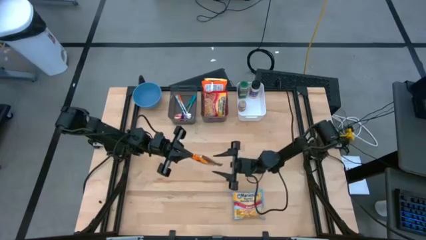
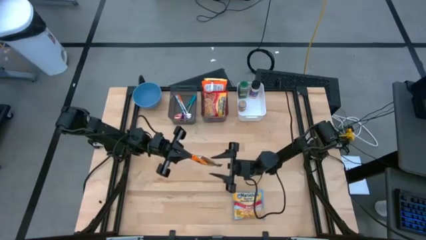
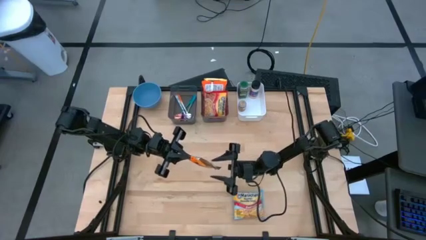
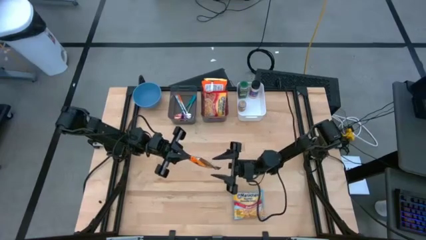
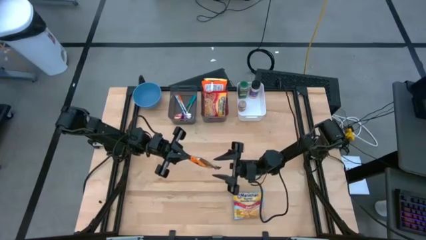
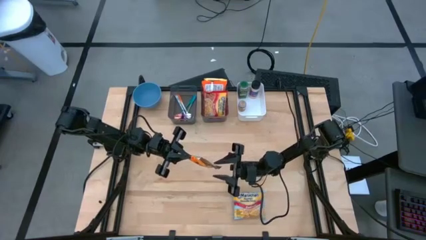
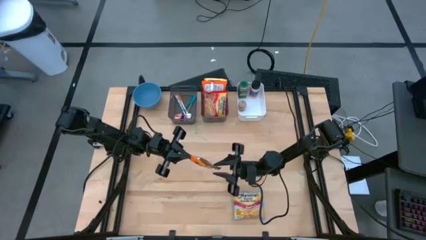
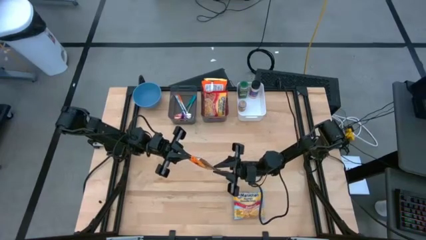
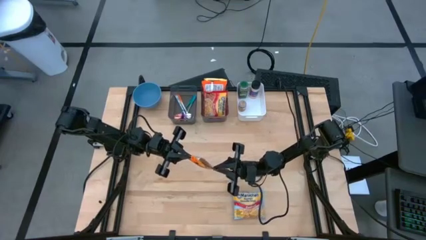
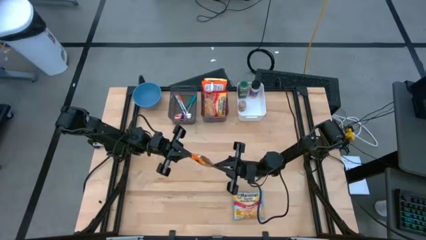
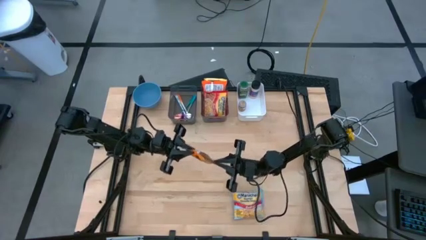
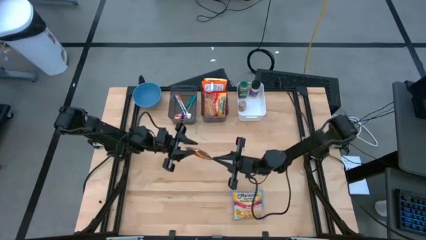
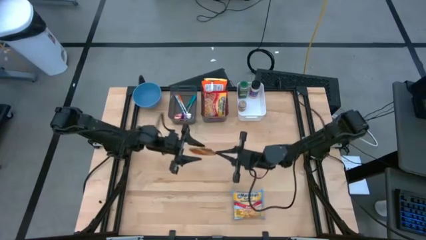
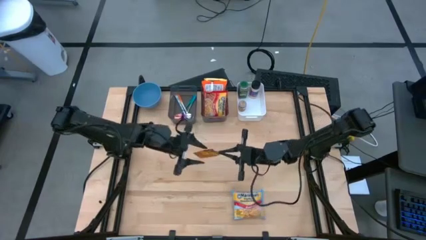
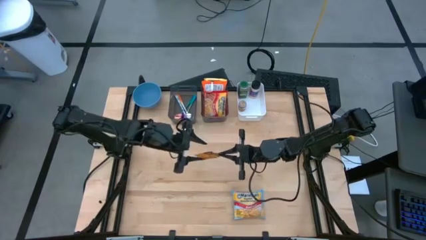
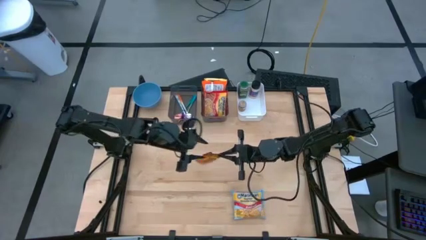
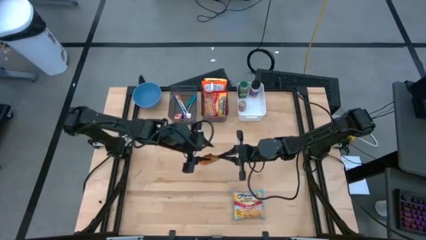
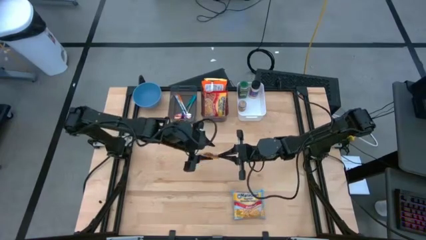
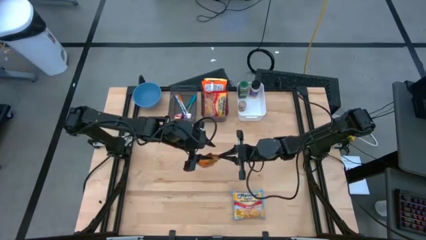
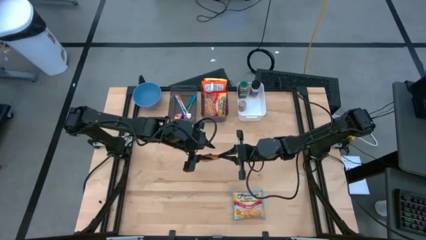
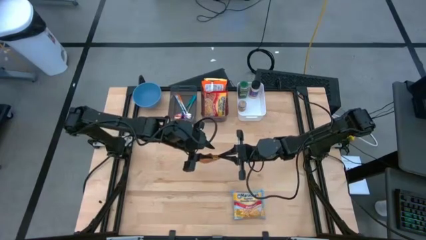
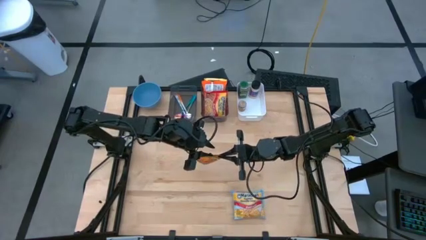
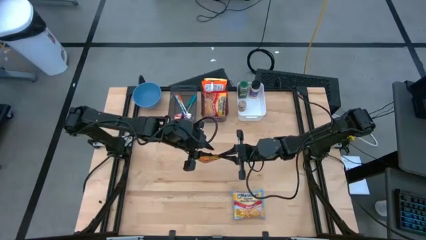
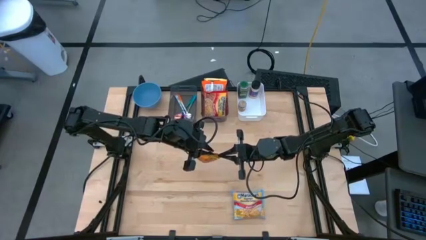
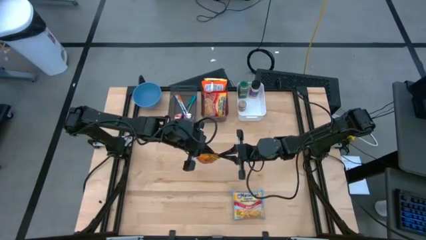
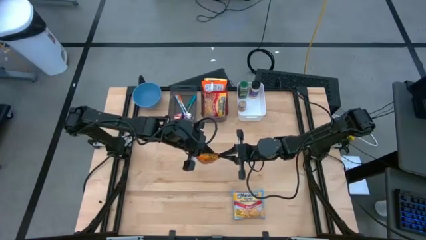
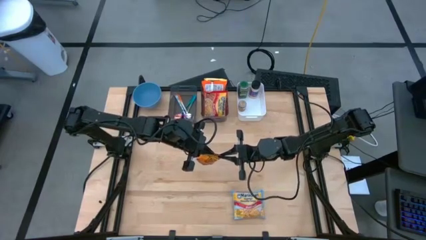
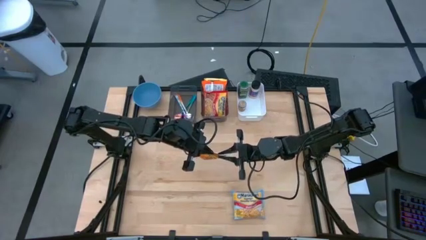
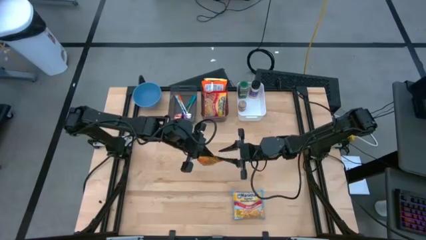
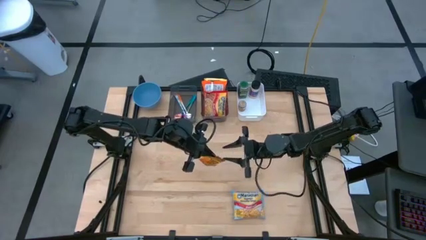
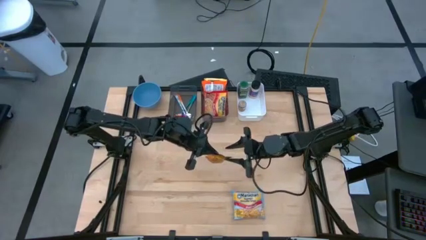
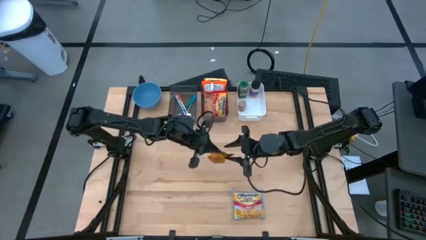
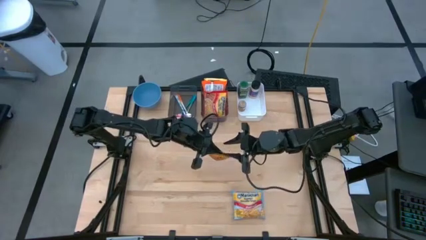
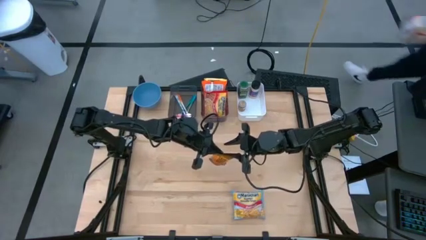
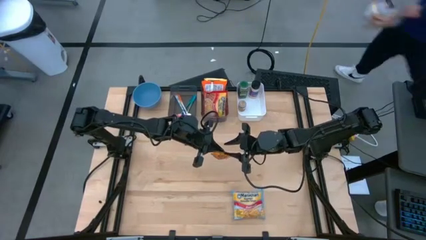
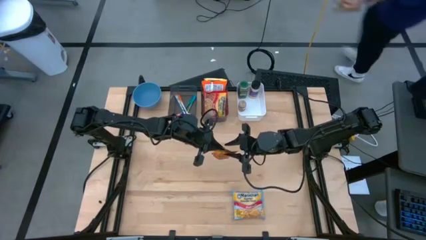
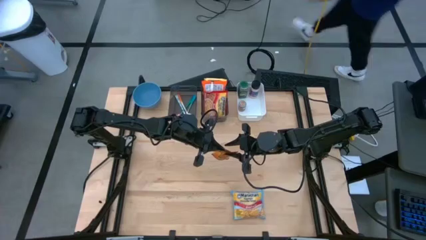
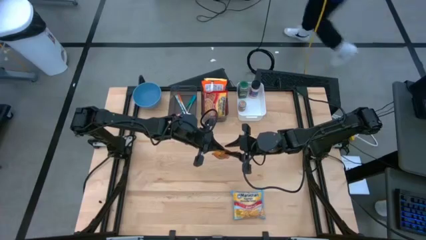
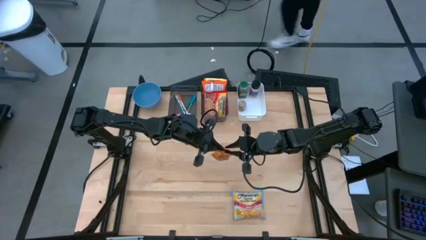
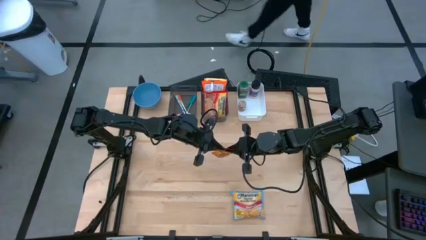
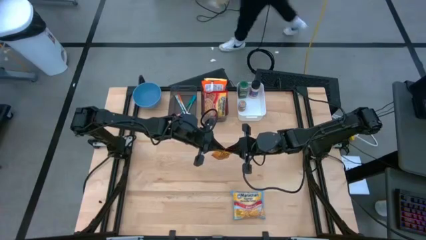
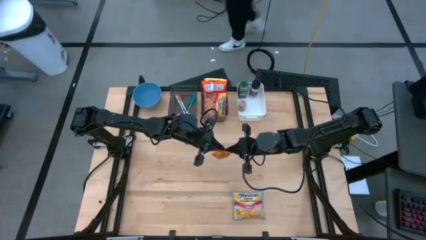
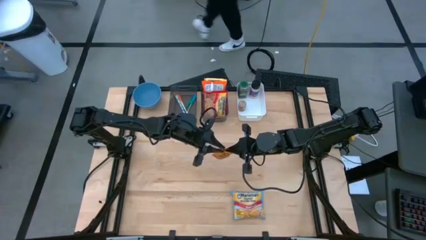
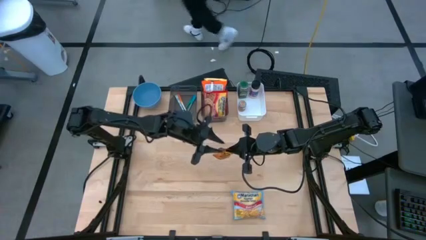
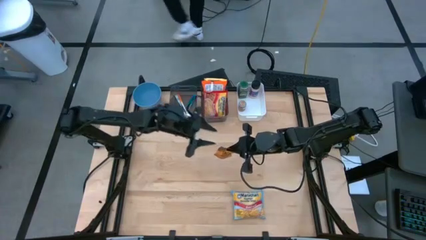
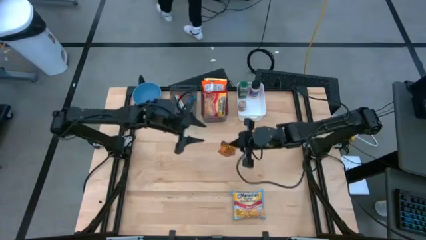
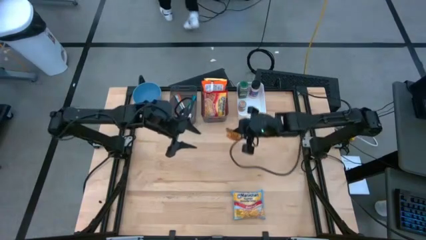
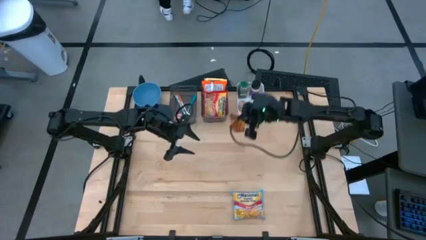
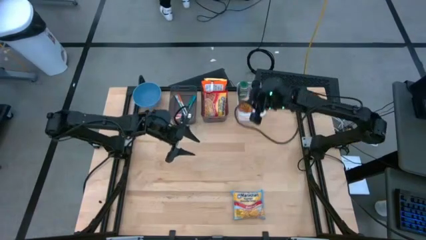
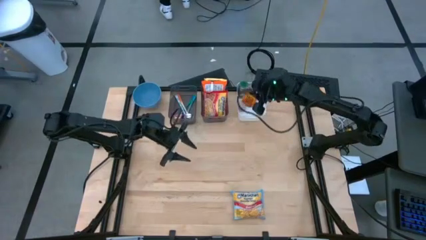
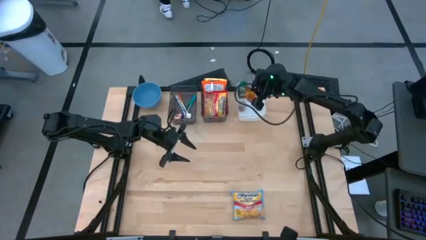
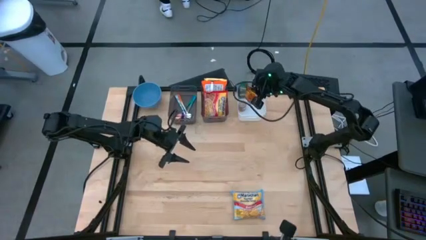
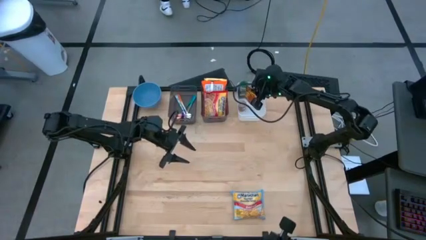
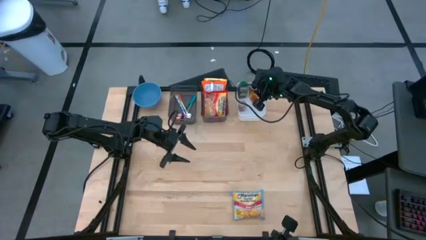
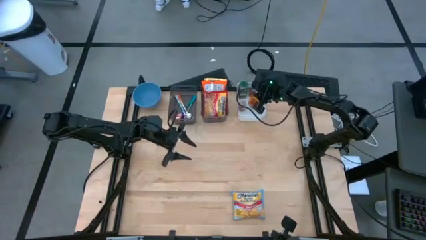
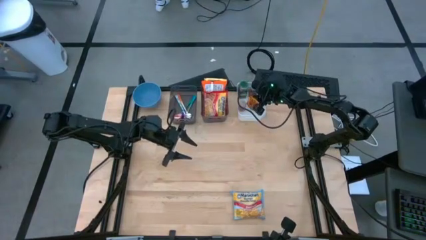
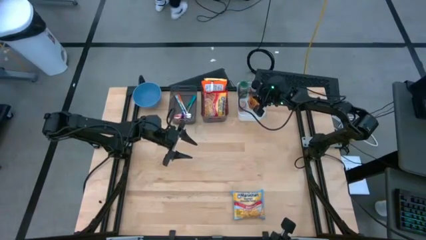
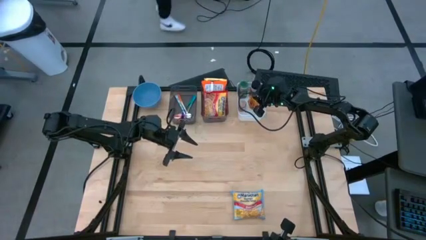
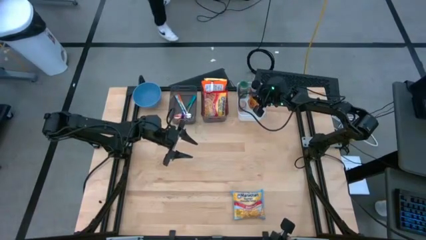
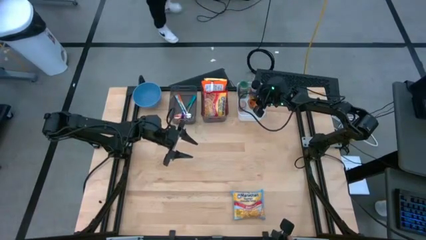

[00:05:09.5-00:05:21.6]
Task: Pick & Place Food Item
Put the orange seasoning pack into the white bin

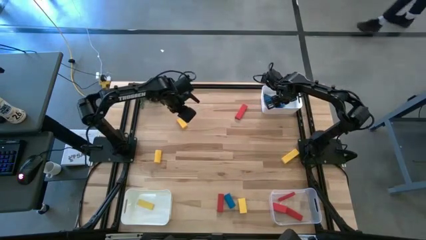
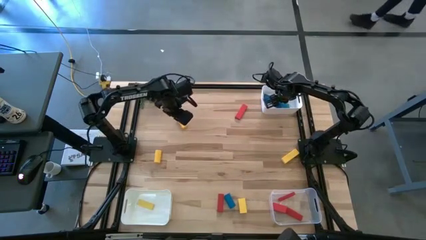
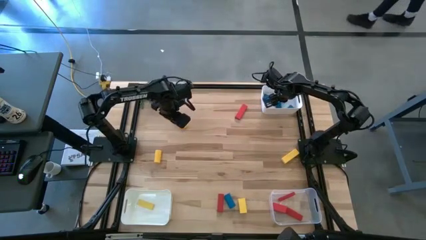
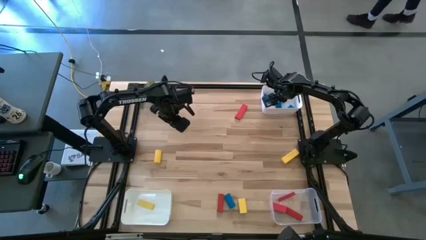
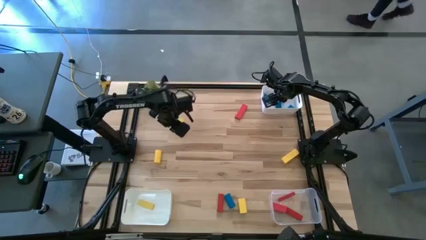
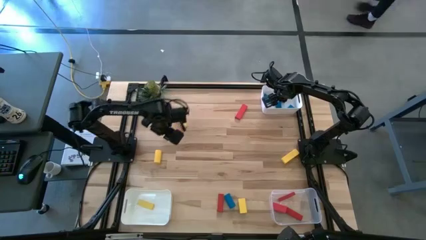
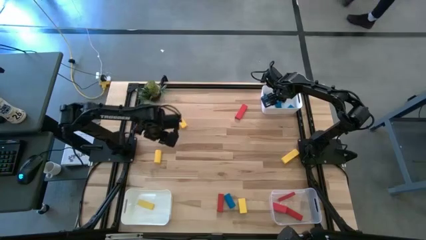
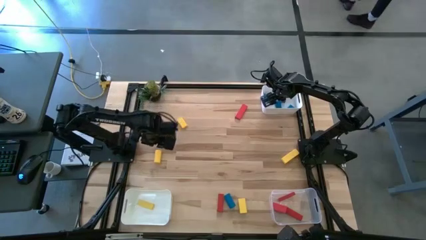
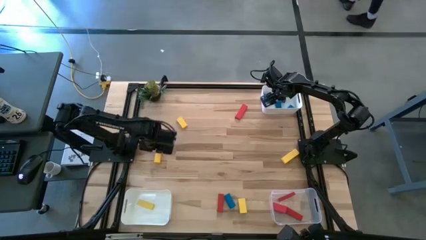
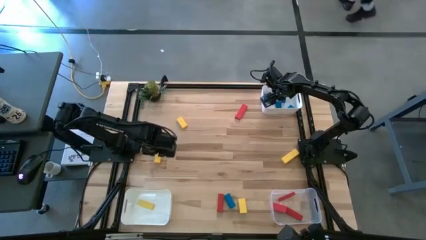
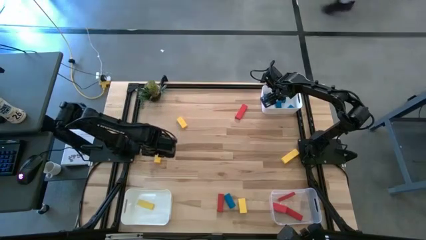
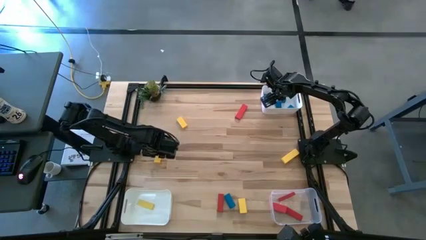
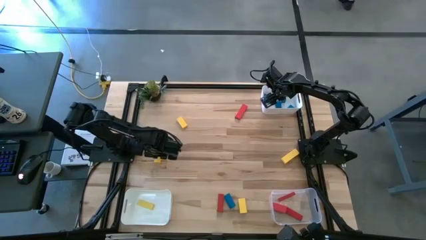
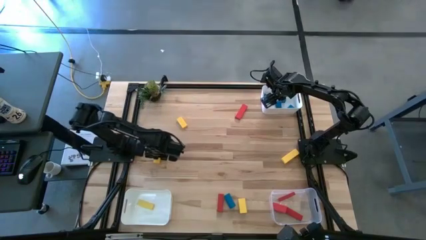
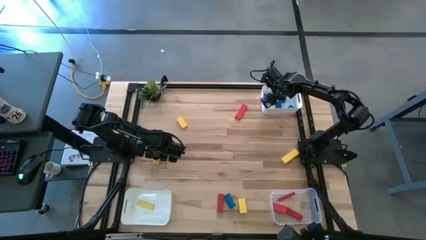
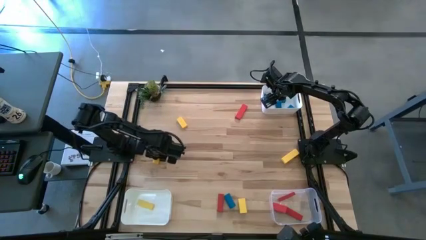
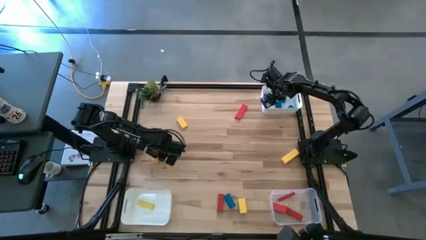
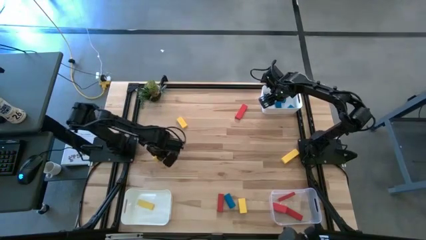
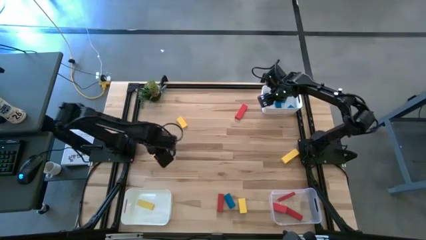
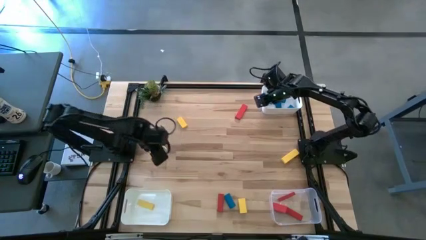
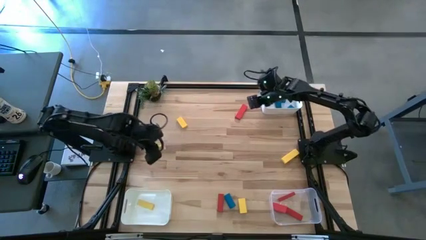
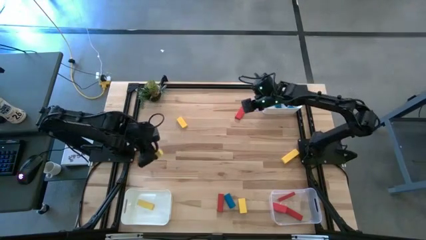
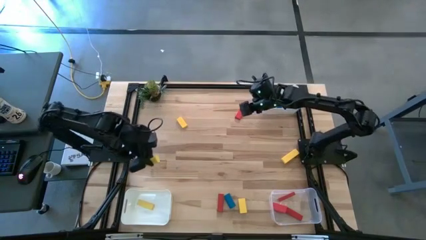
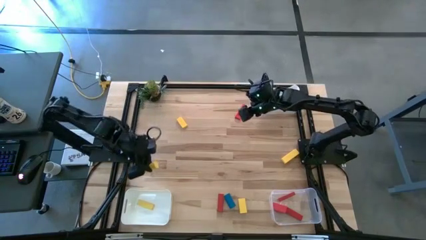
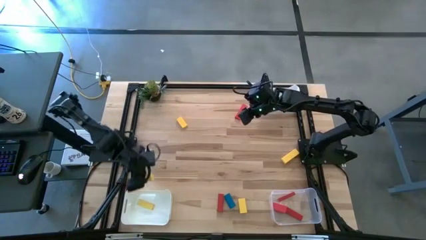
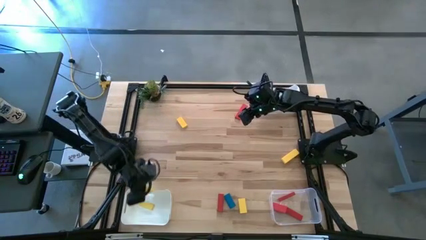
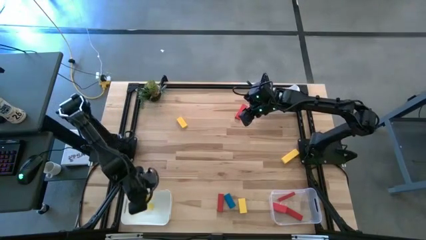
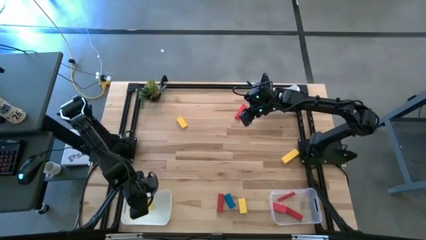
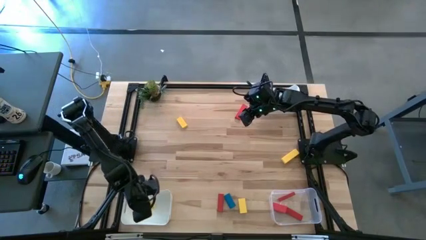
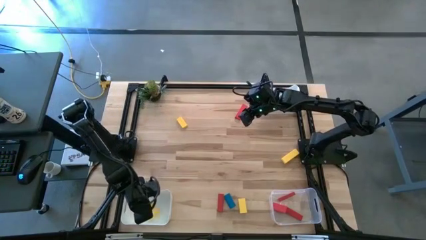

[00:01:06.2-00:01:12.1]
Task: Sort & place blocks by color
Put the yellow block into the bottom white bin
